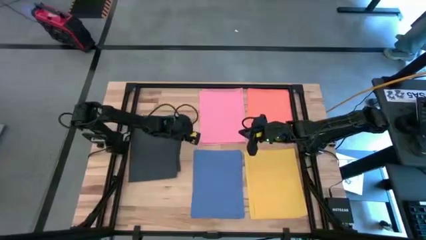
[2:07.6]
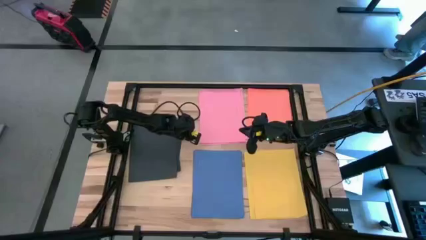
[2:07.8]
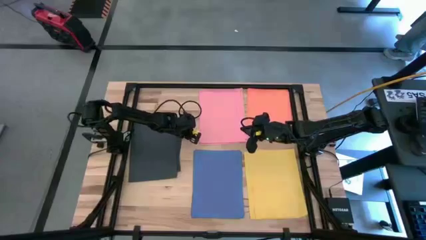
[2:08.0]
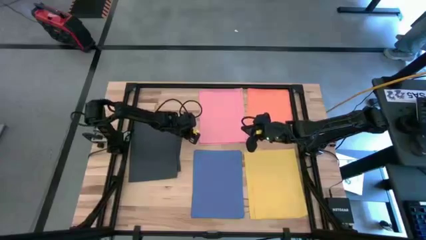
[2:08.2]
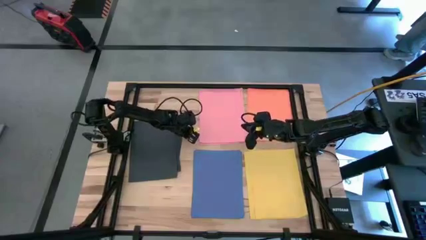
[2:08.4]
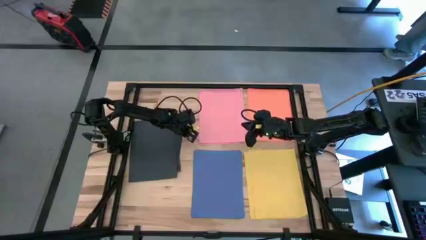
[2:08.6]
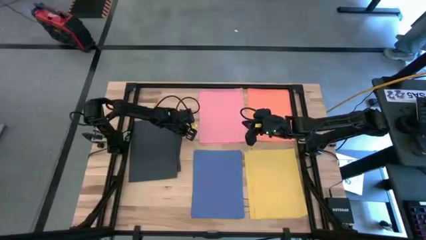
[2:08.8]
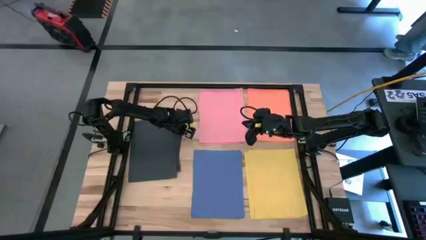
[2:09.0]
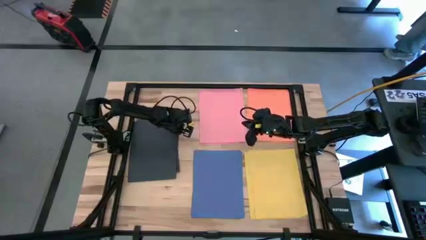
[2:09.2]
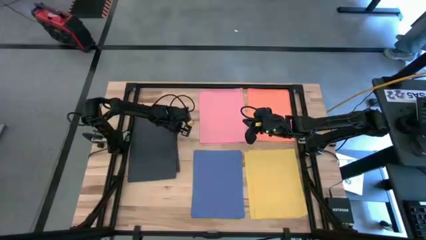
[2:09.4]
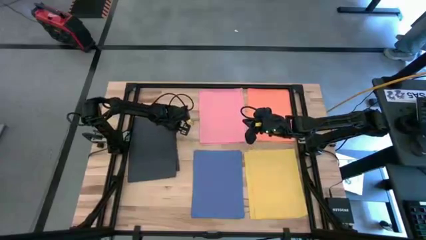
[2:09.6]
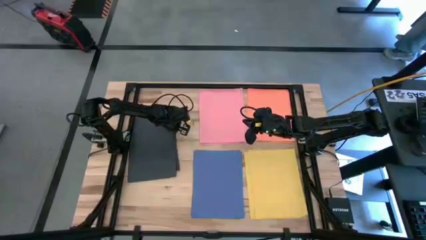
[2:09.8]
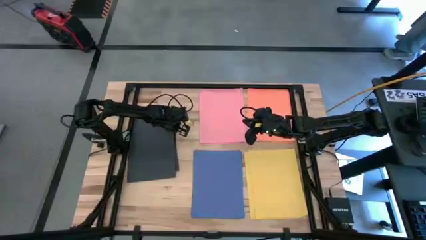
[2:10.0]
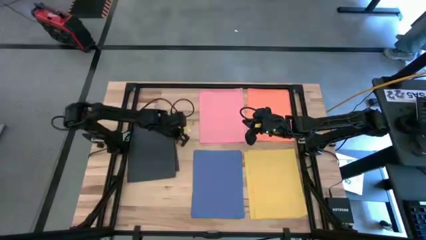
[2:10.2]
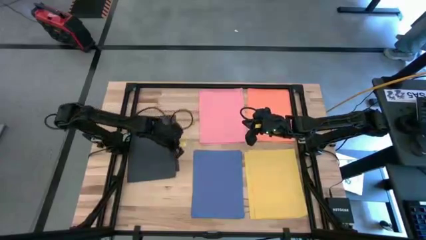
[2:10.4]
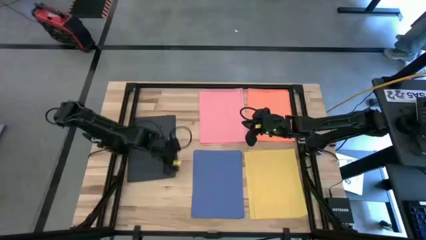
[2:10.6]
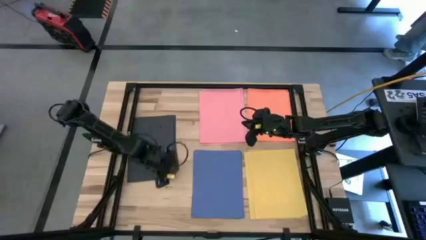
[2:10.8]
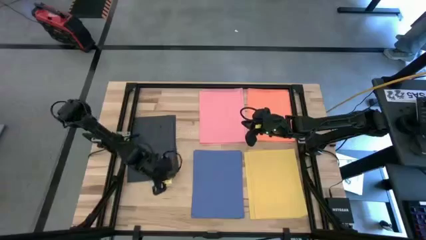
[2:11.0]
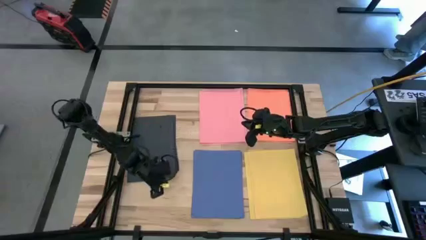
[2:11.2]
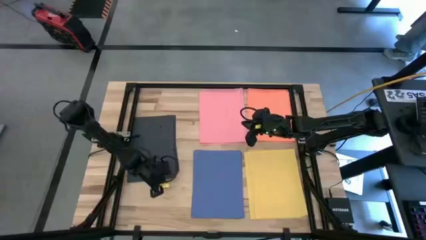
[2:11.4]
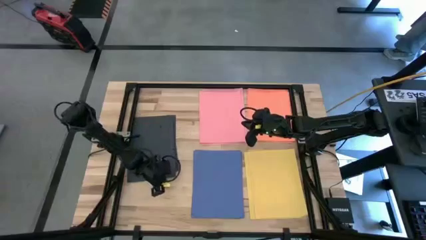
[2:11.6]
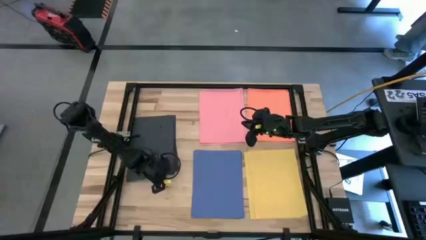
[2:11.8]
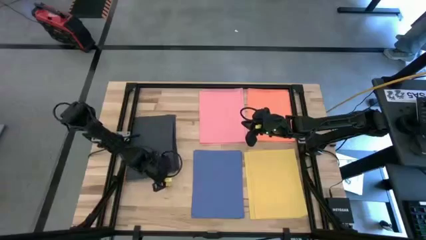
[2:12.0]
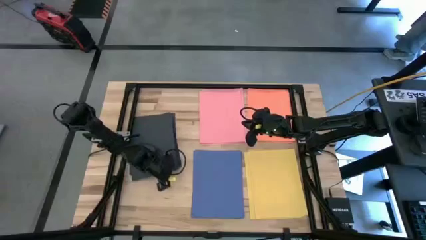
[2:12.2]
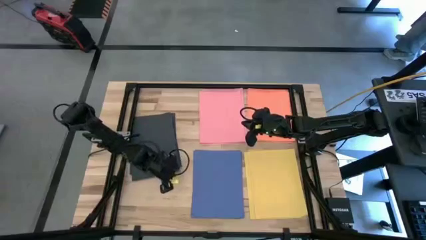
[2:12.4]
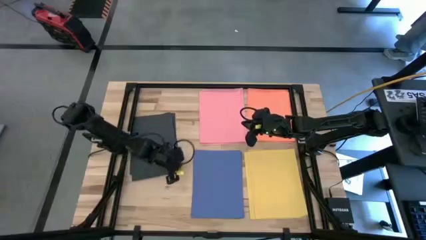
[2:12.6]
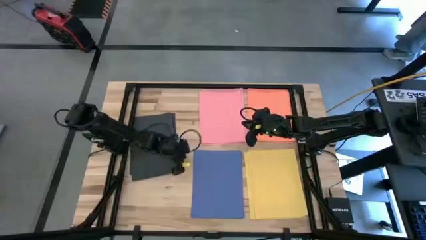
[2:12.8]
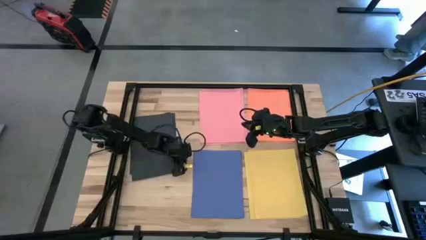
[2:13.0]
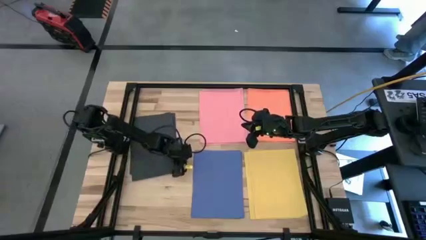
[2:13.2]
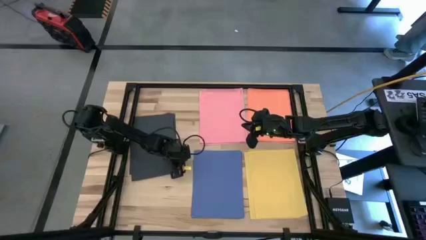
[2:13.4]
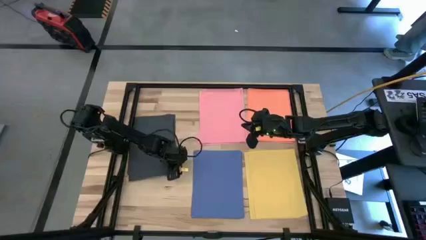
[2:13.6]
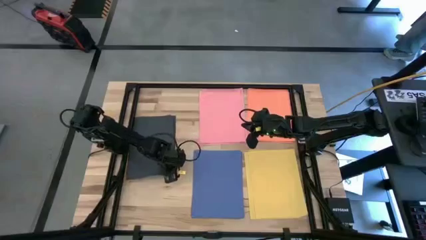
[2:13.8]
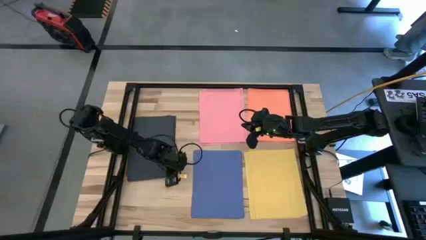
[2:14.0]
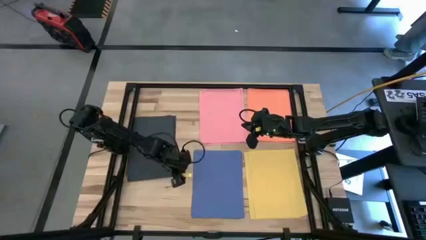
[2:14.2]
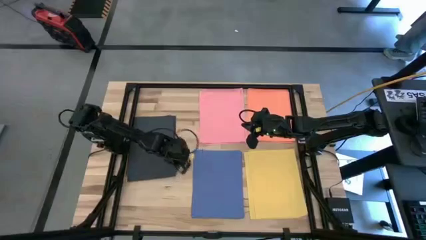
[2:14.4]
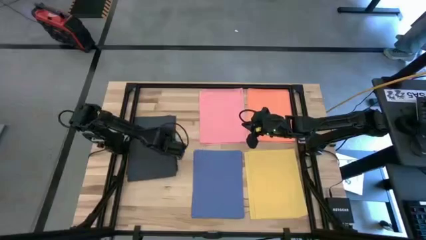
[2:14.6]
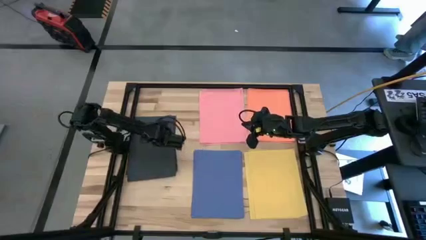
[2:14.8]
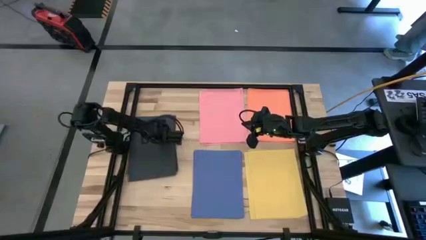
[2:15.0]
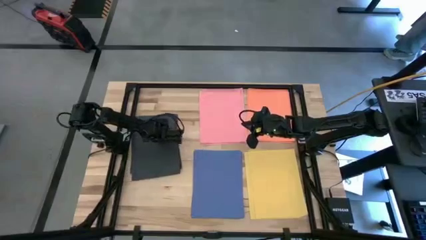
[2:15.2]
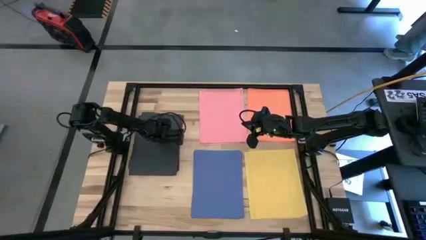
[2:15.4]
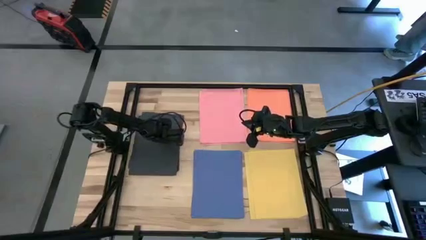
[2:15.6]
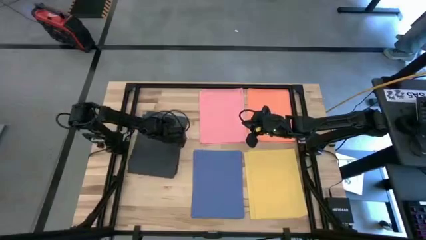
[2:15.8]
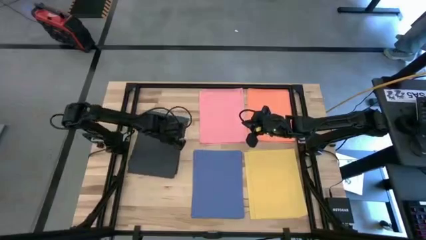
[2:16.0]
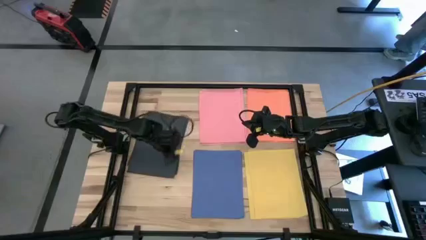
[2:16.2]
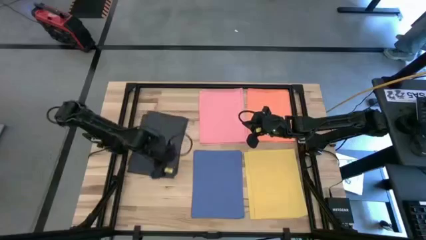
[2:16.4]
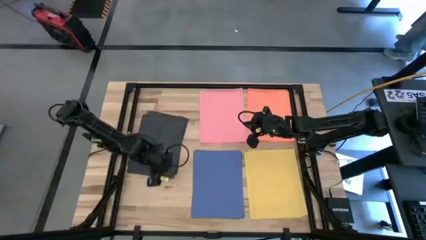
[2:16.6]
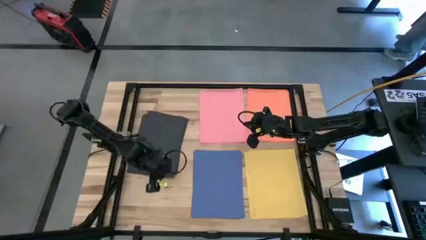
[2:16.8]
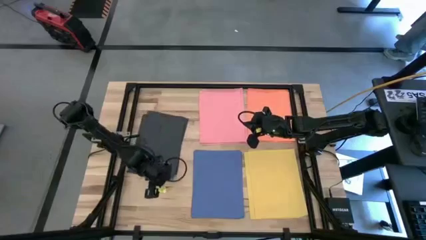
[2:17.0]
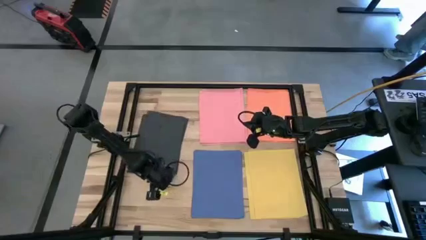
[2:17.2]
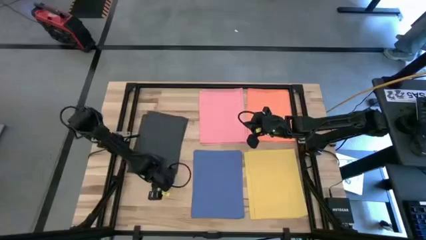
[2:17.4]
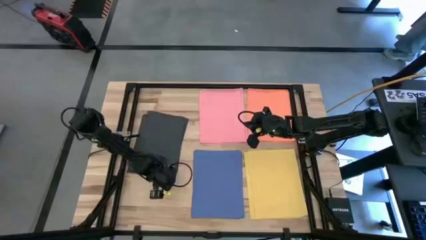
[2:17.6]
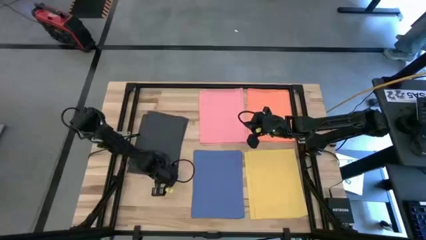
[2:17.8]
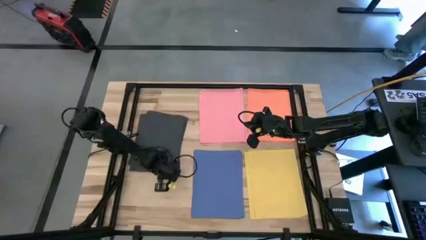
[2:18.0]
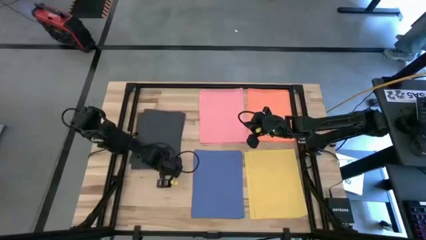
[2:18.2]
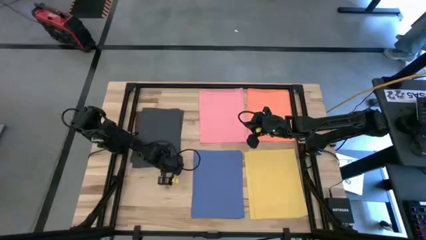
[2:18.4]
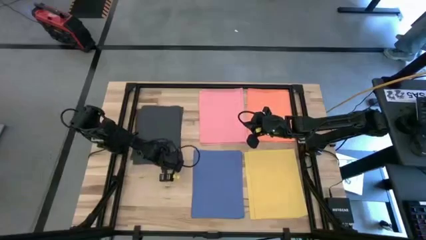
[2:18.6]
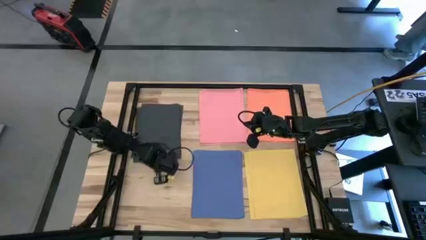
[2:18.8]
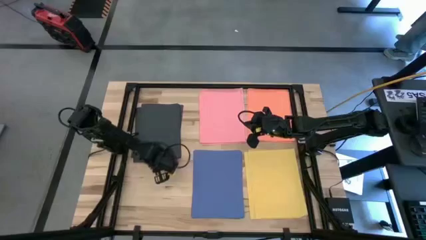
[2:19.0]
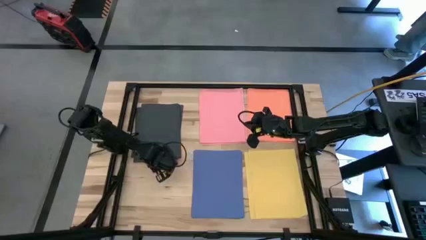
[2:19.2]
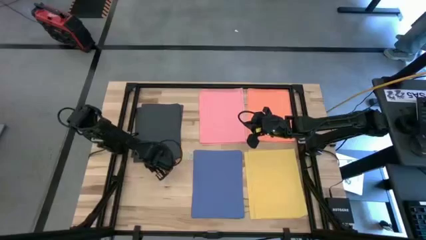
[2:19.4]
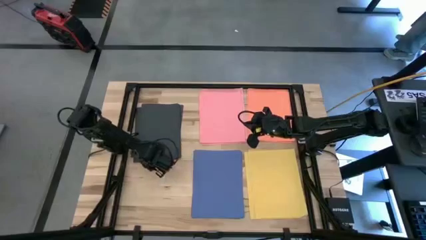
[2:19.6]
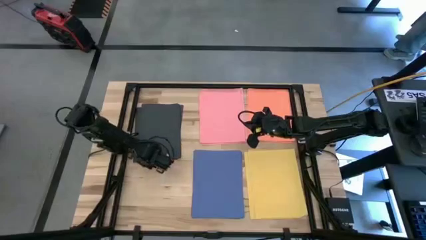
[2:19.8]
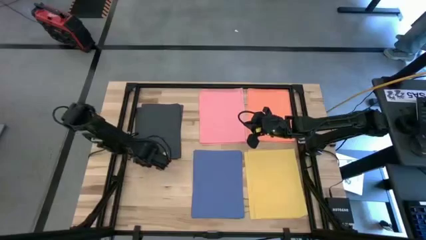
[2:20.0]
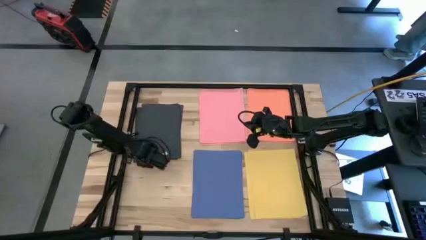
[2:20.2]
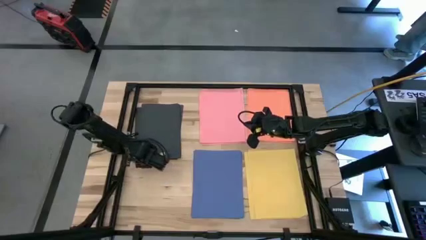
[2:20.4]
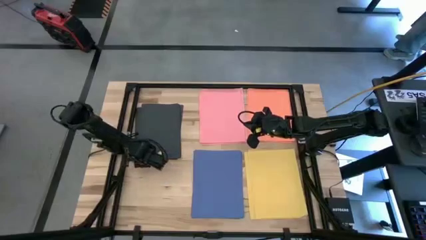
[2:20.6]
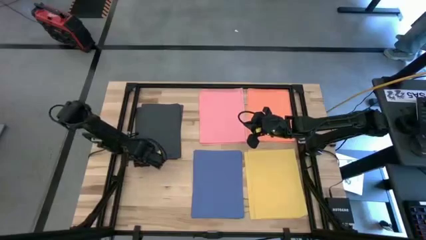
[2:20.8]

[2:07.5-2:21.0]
Task: Organize paper
Move all of the black paper at the upper left of the table

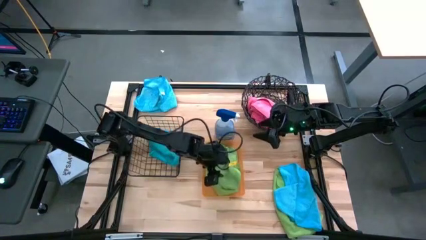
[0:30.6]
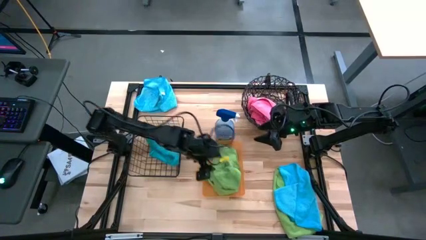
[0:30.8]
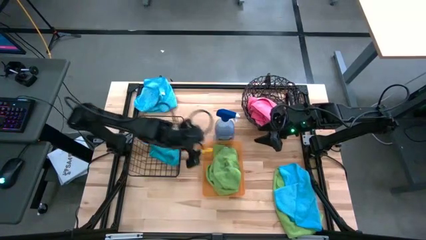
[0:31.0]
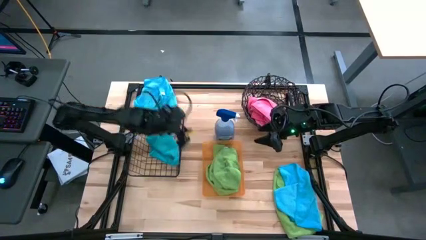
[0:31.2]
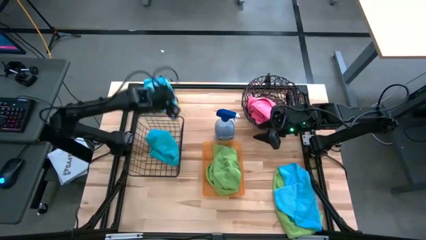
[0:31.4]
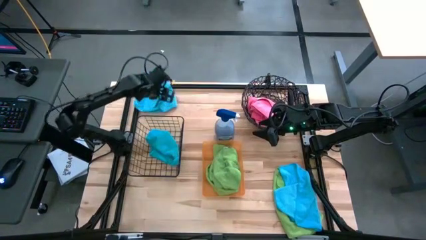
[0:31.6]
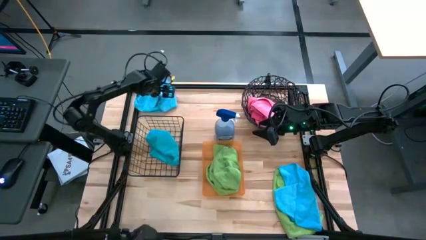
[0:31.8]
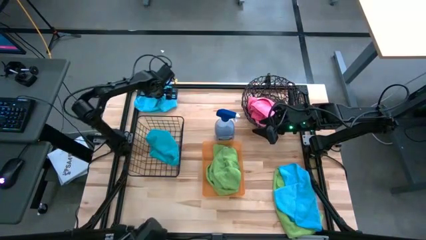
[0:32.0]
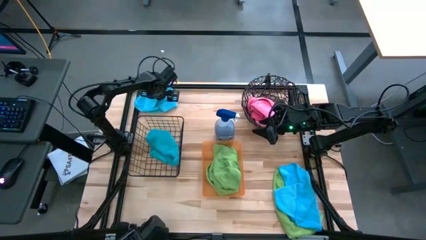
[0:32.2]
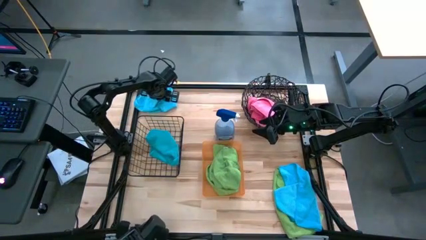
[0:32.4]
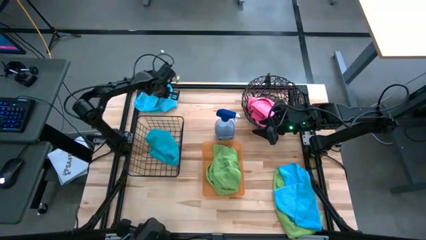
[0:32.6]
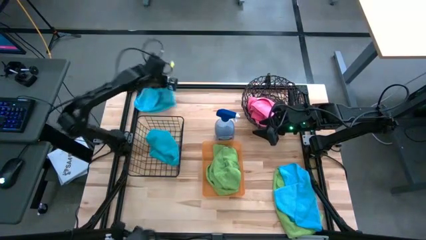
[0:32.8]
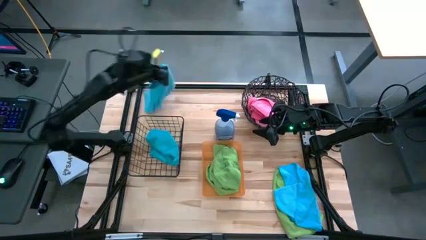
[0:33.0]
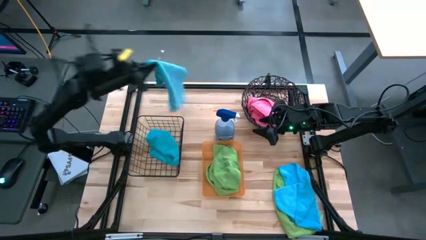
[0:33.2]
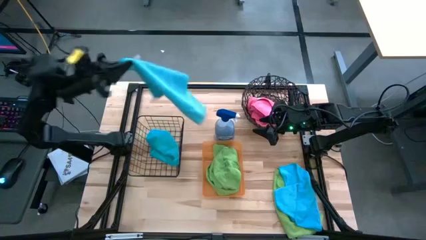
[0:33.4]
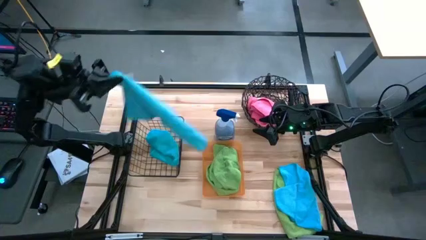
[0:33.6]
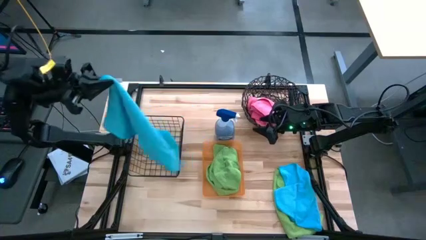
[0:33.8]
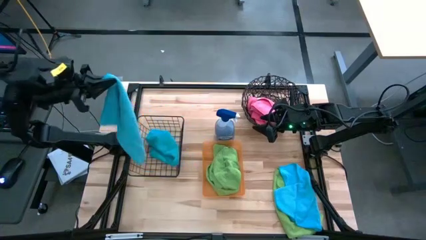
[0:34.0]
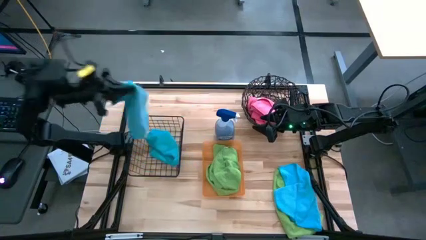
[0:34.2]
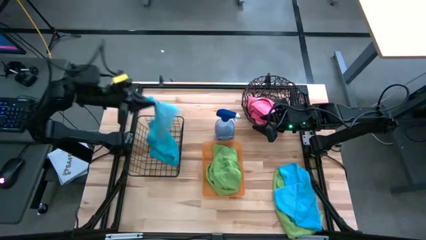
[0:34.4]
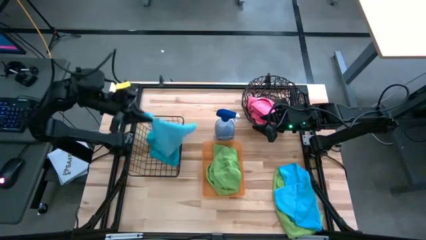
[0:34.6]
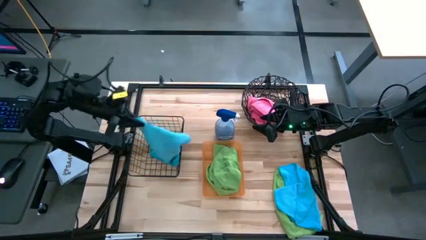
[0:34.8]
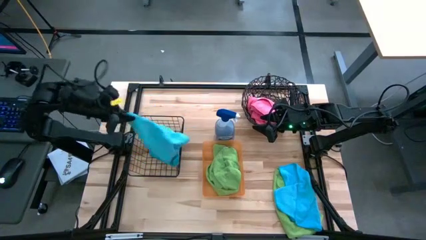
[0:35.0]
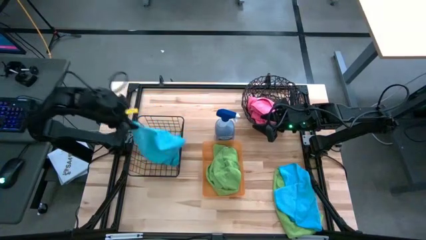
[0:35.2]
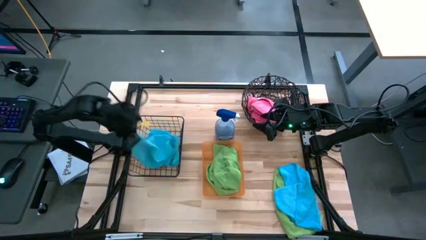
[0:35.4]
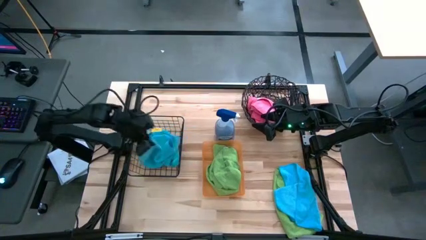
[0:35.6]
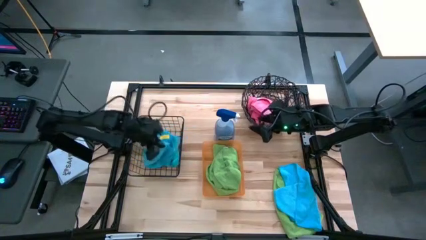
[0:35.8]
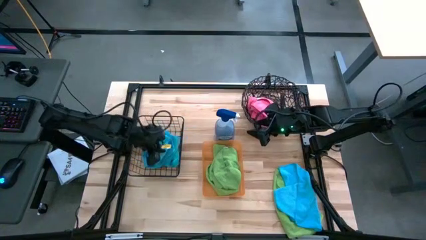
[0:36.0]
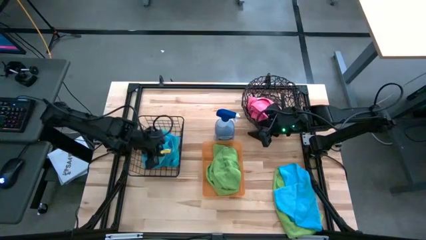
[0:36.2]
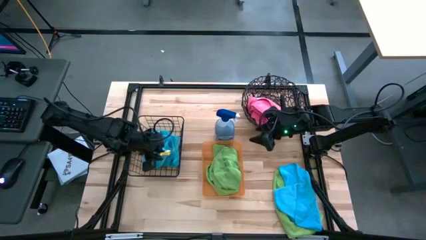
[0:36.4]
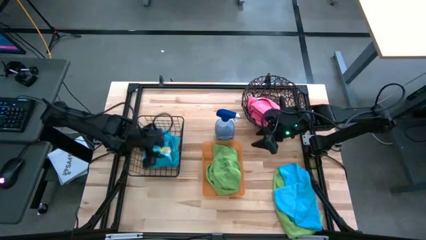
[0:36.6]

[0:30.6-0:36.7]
Task: Sort microfiber towel by color & place in baskets
Put the top blue microfiber cloth into the wire basket
